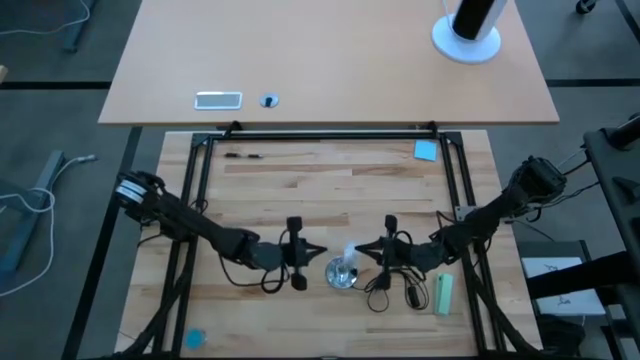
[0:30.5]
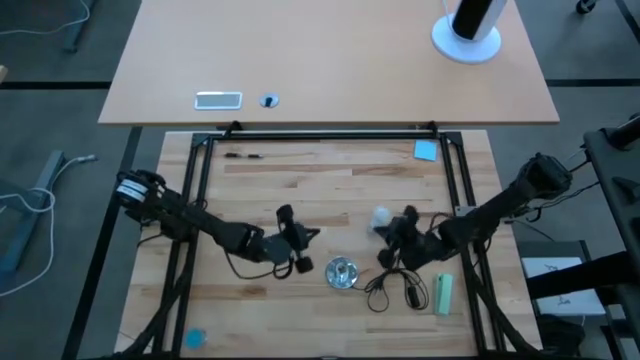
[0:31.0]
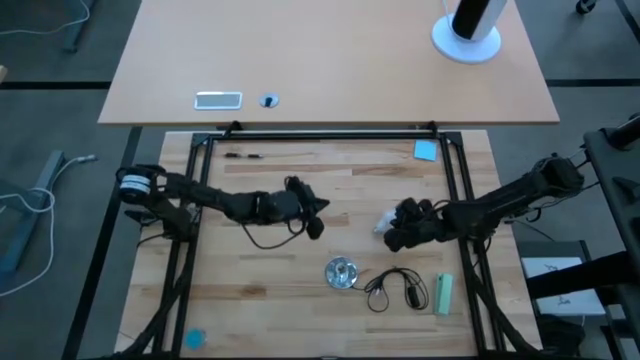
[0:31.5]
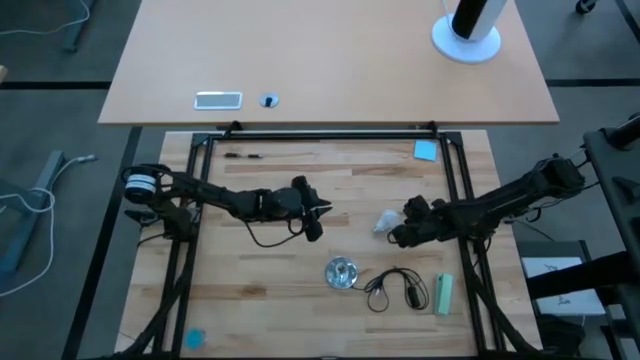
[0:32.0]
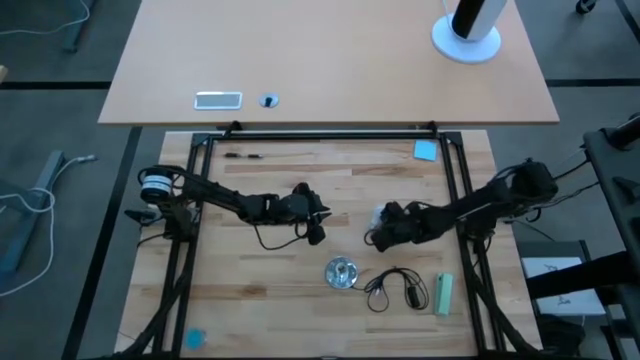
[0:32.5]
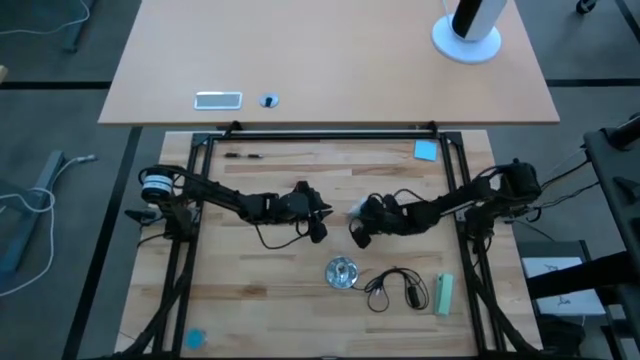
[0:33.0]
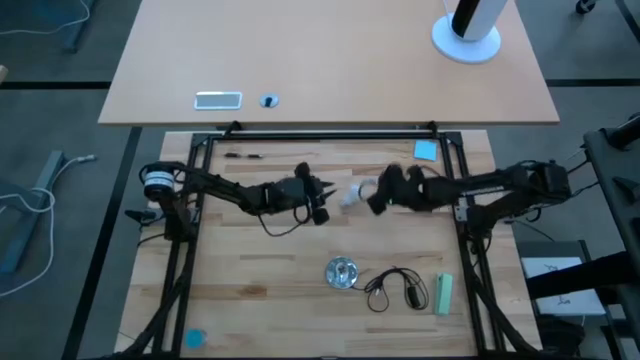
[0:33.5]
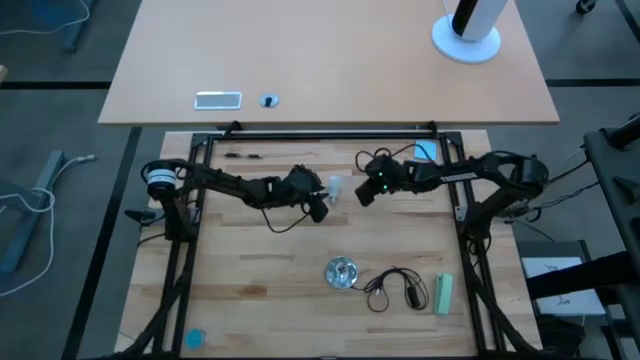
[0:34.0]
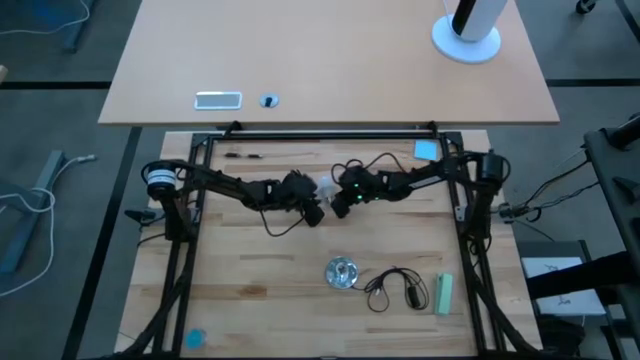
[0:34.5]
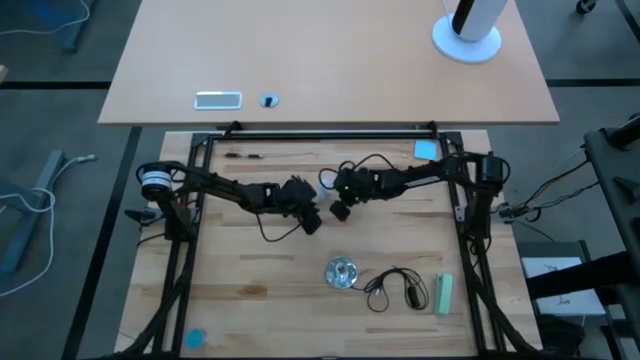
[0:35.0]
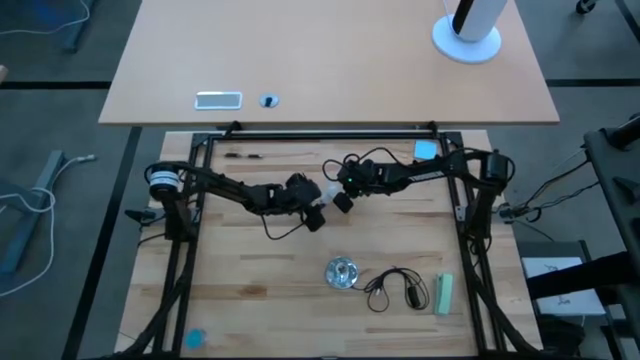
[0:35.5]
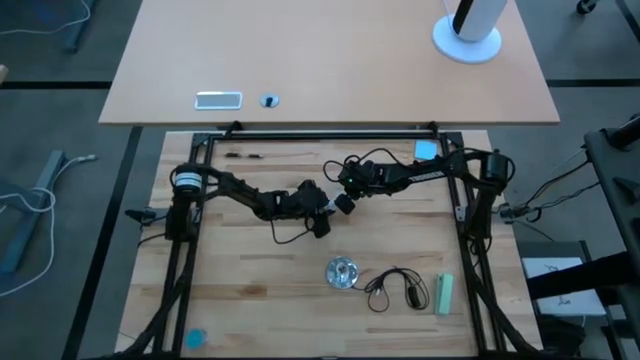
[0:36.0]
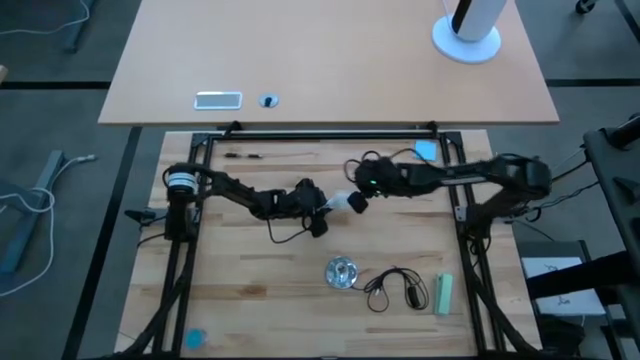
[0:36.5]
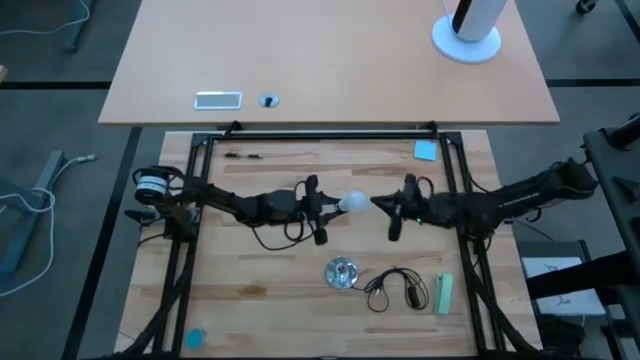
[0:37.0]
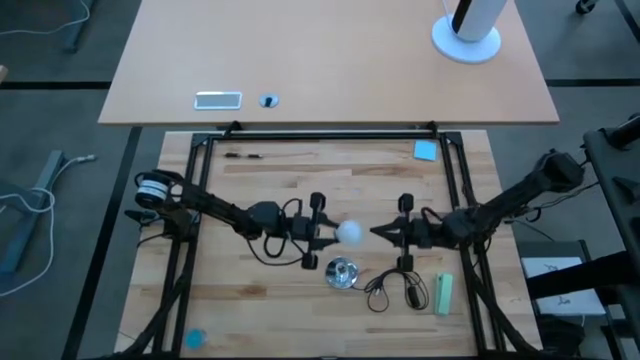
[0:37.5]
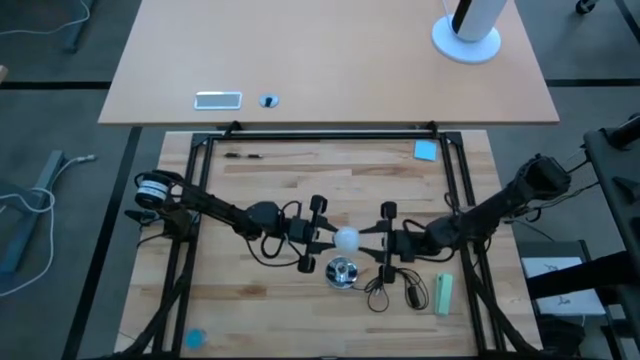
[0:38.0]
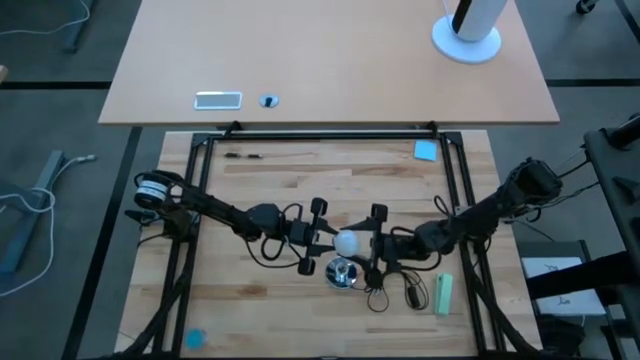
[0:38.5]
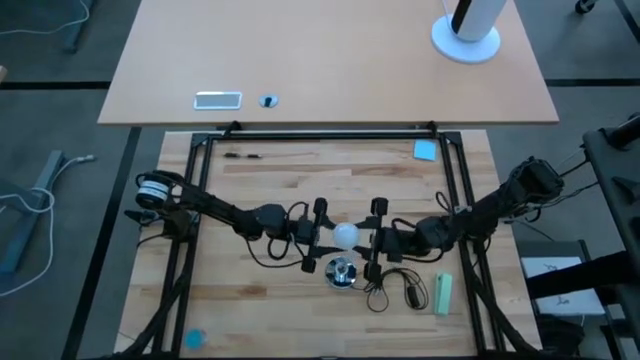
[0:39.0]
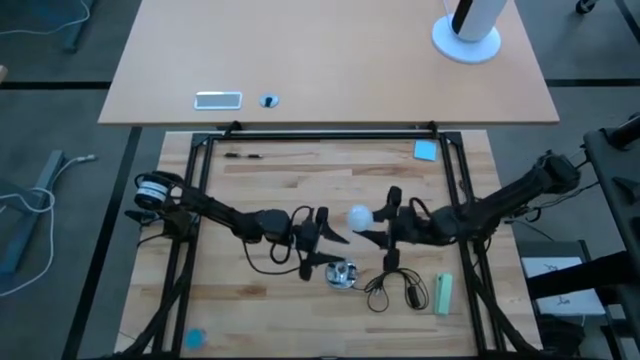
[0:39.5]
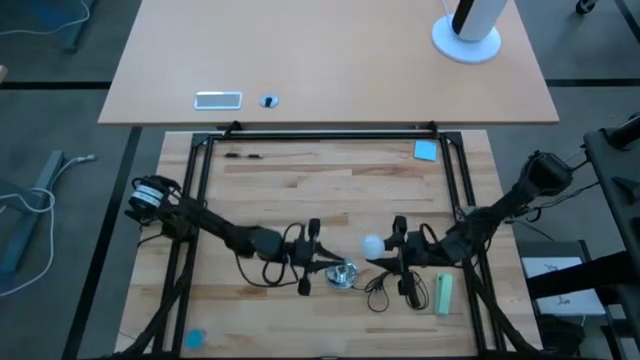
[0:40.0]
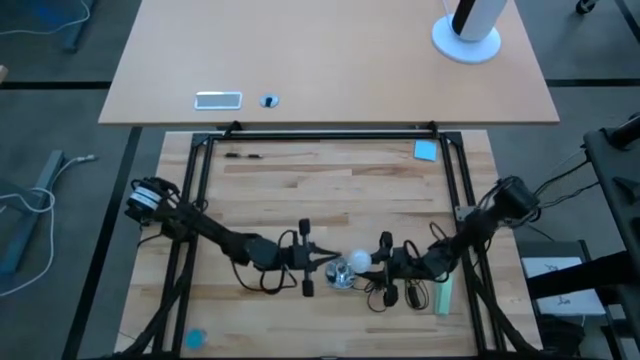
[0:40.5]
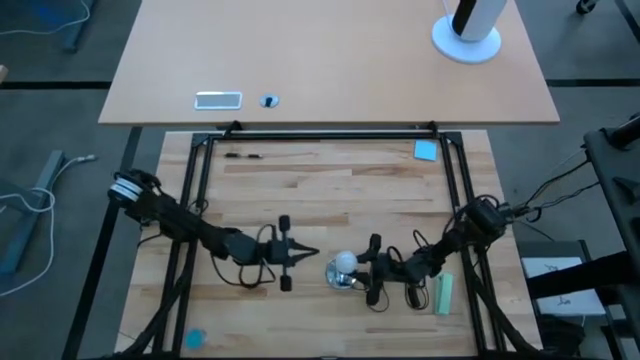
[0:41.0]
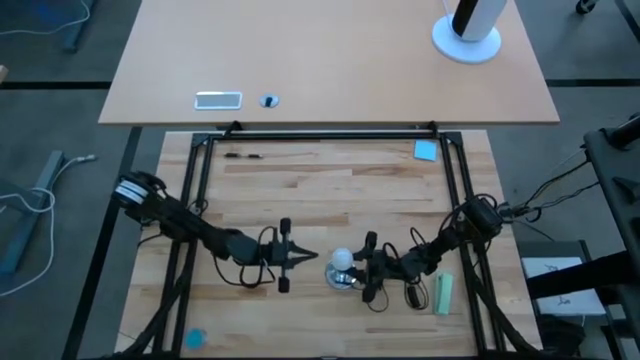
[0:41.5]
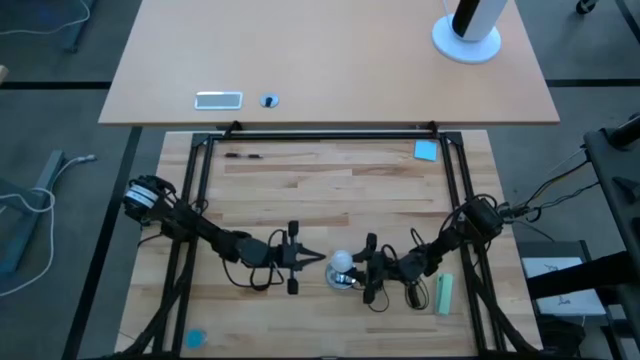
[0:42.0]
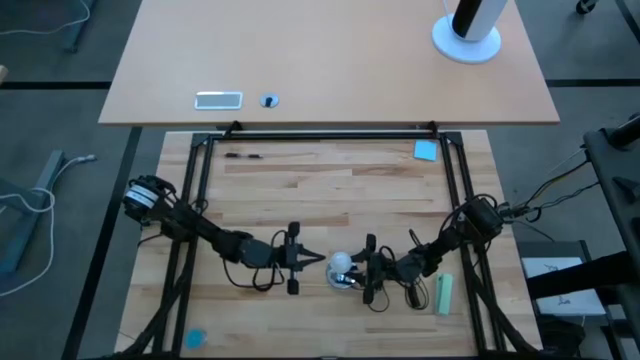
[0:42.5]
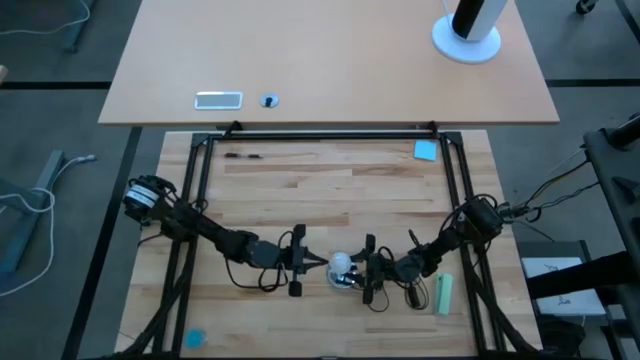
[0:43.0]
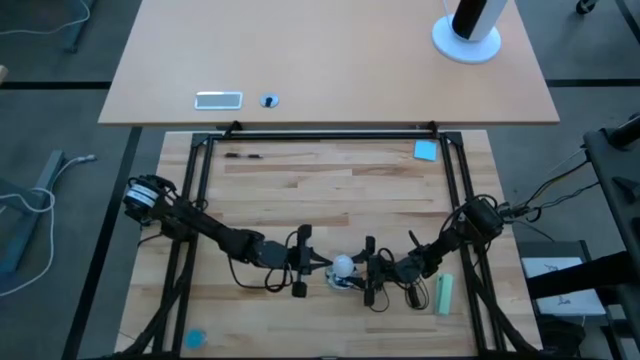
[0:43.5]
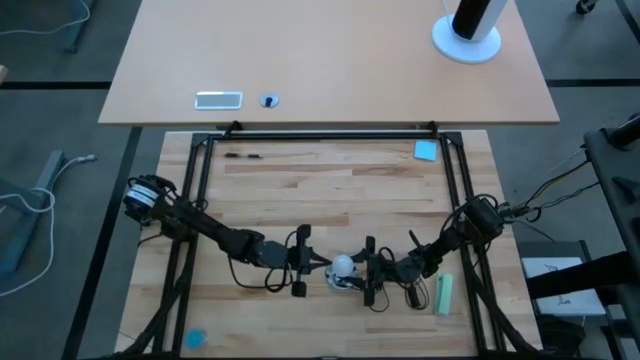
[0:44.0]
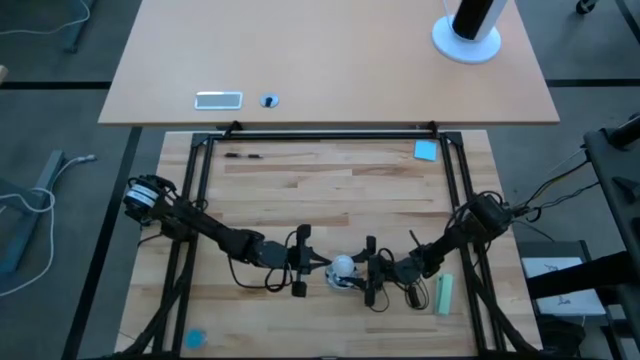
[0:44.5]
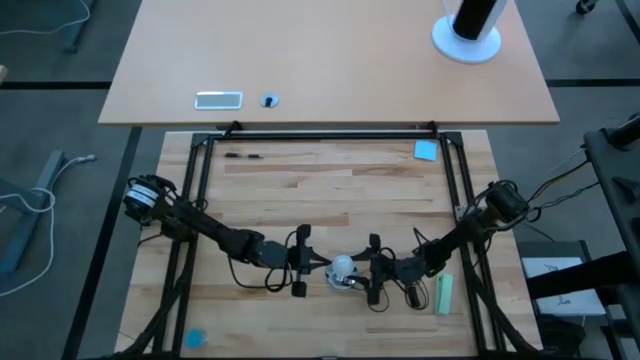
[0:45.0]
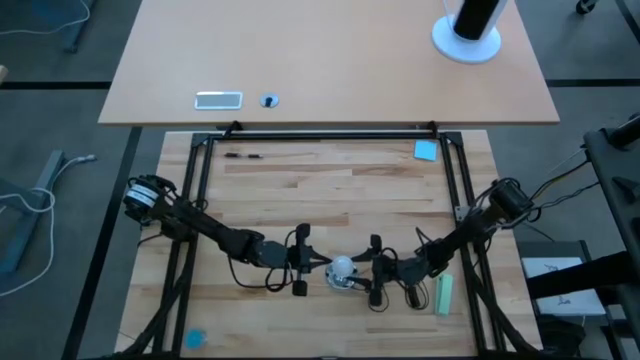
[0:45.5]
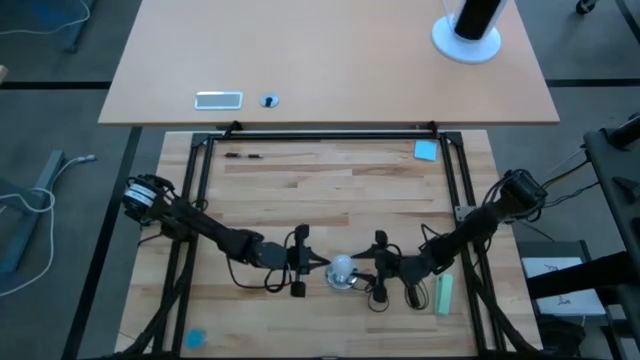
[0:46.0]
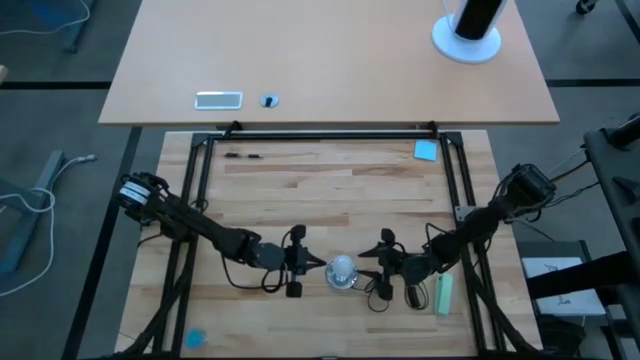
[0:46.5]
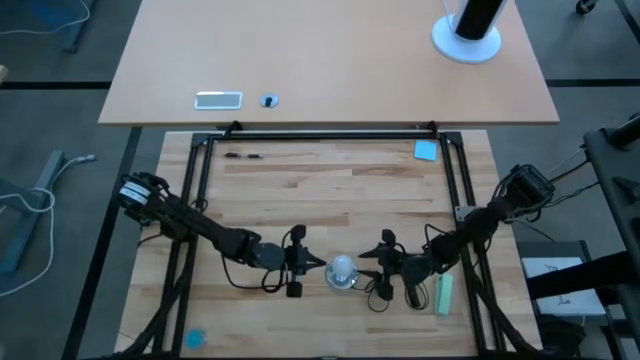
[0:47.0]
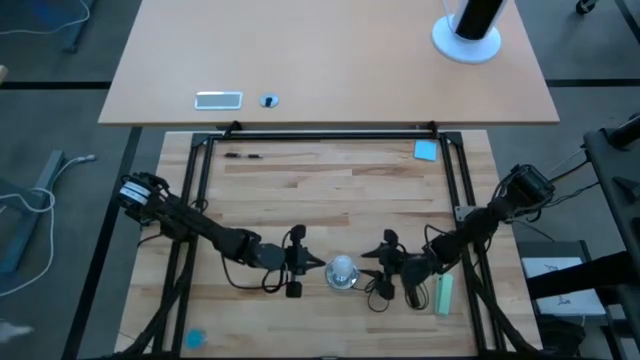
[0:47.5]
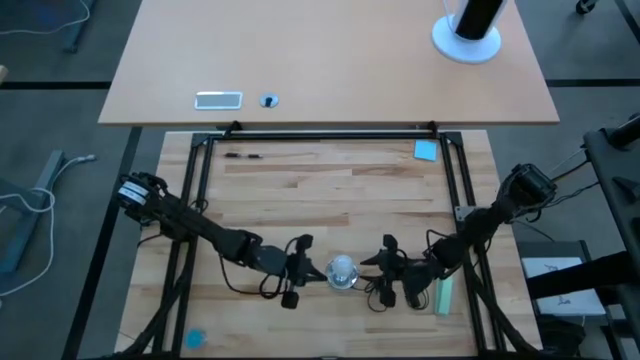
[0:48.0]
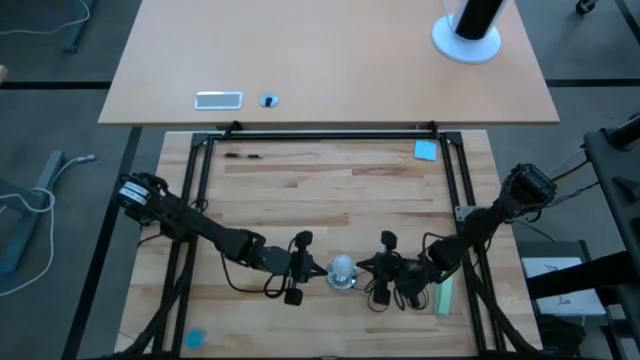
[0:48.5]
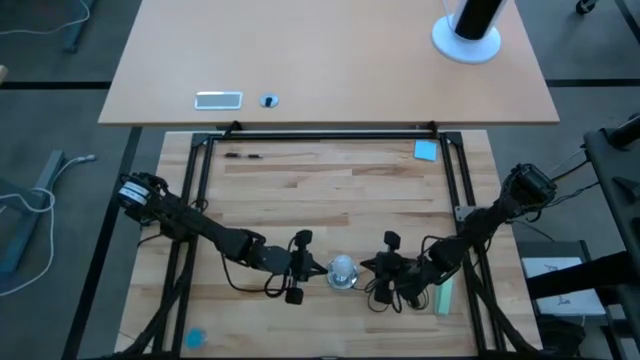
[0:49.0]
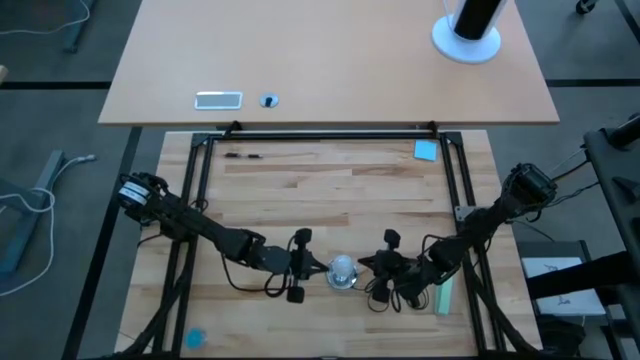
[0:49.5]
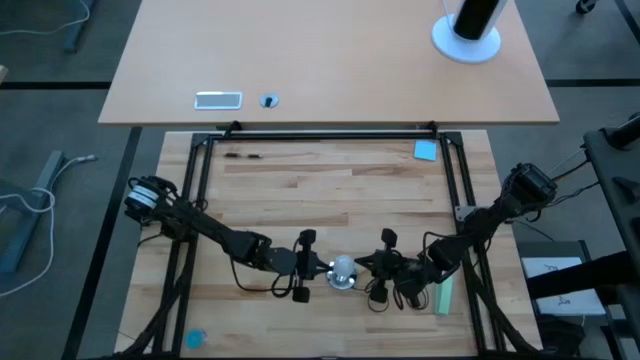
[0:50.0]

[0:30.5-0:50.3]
Task: Screw lightbulb
Insert the lightbulb into the lamp

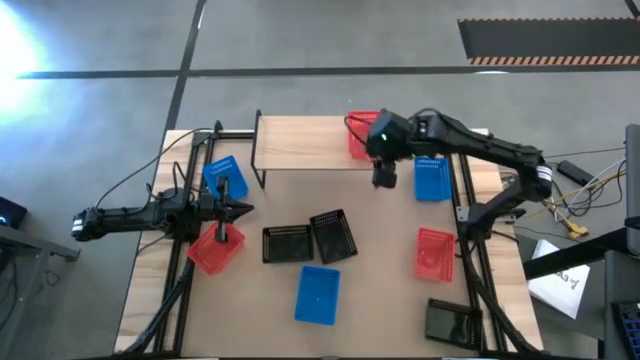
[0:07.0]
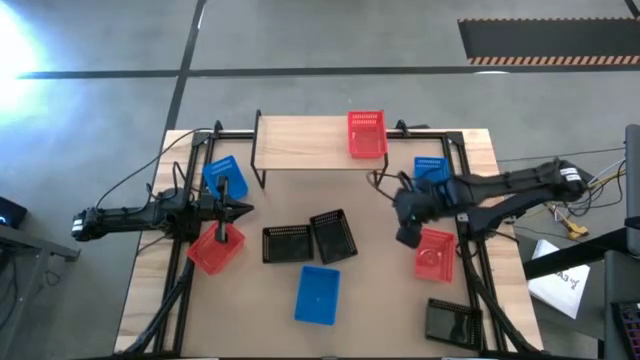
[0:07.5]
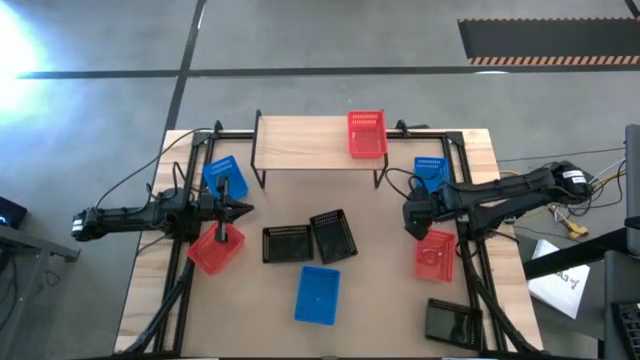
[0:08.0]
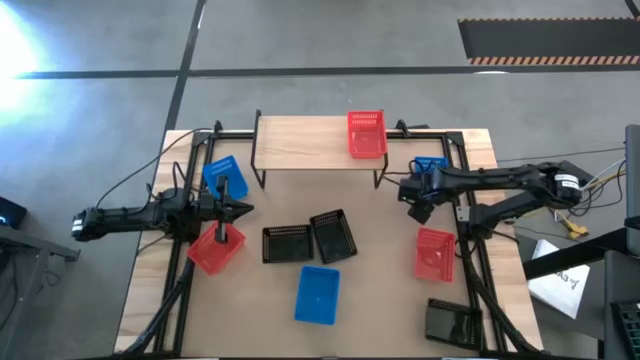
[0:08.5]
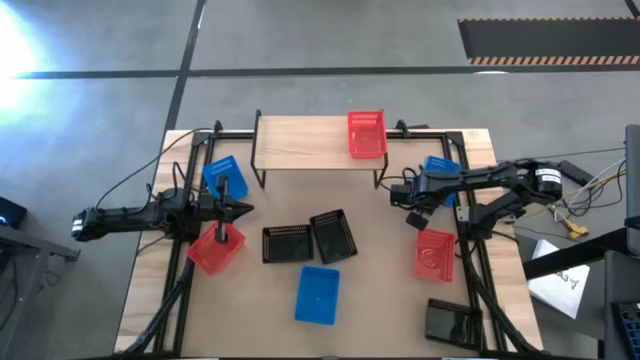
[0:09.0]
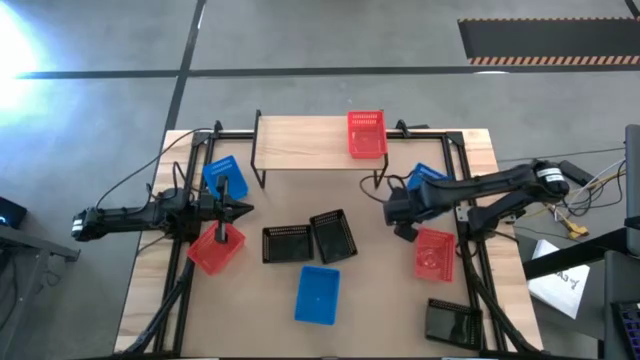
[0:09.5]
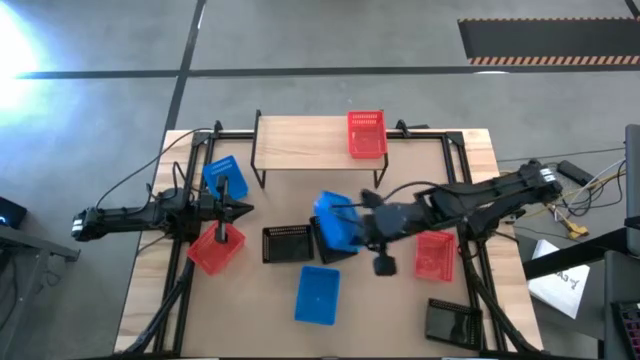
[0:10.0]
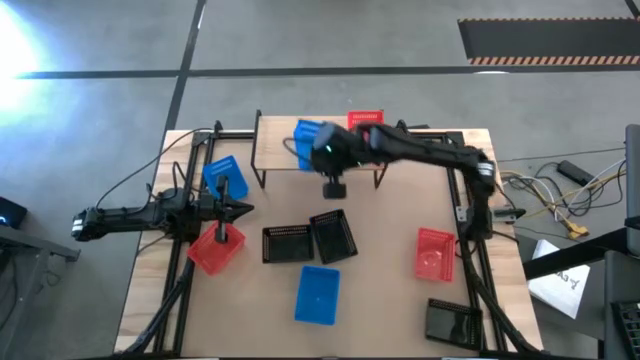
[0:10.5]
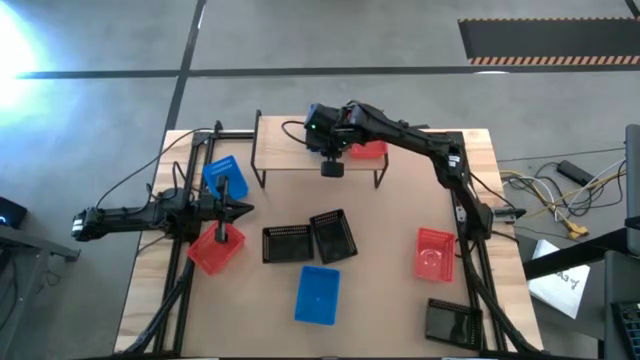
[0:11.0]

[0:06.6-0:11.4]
Task: Stack baskets on shelf by color
Put the right blue bin on the shelf
